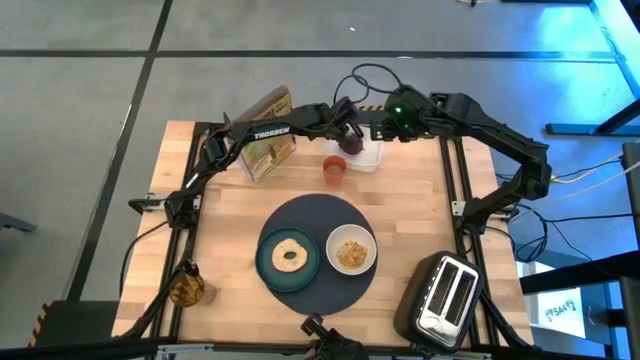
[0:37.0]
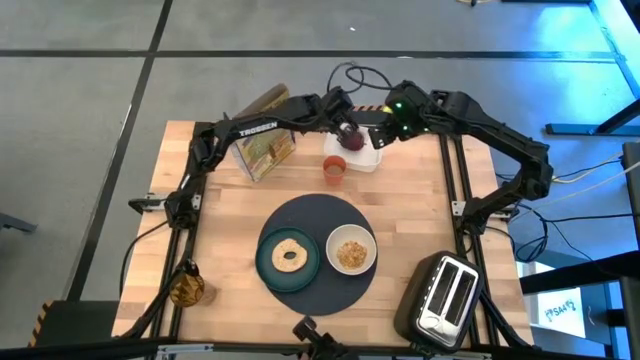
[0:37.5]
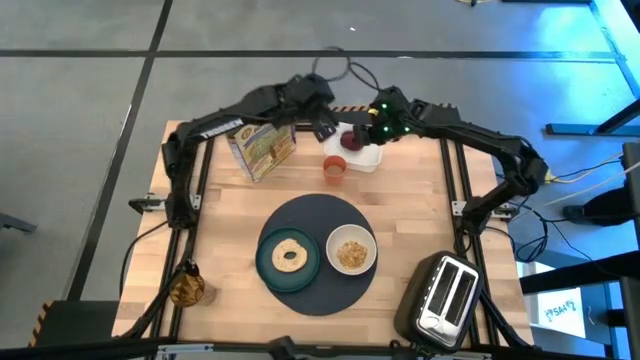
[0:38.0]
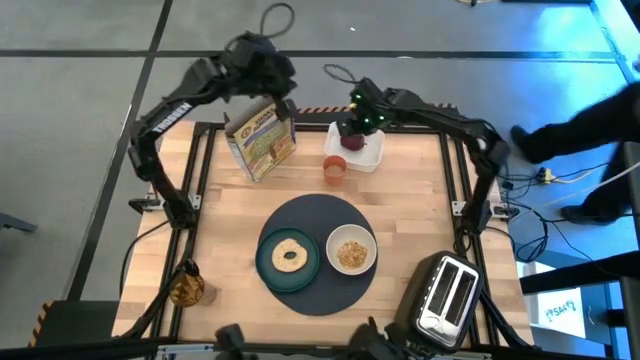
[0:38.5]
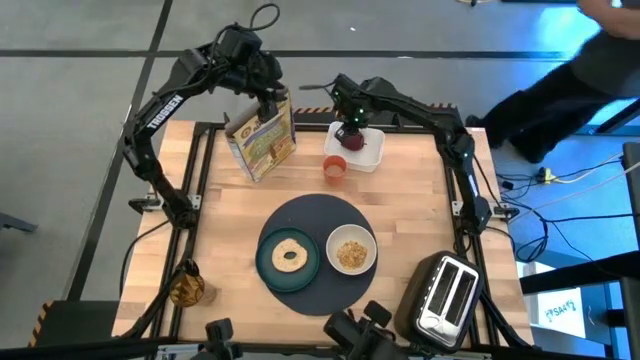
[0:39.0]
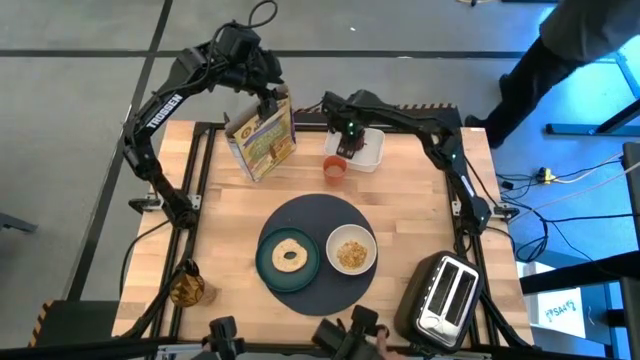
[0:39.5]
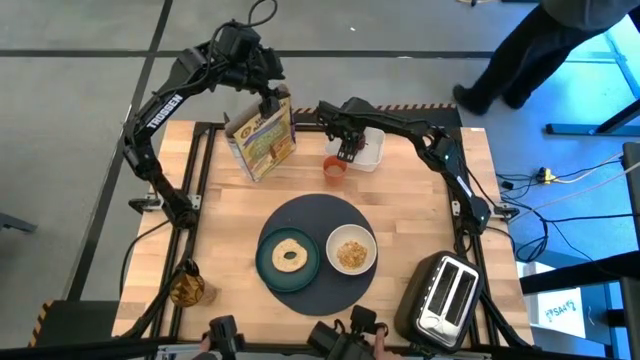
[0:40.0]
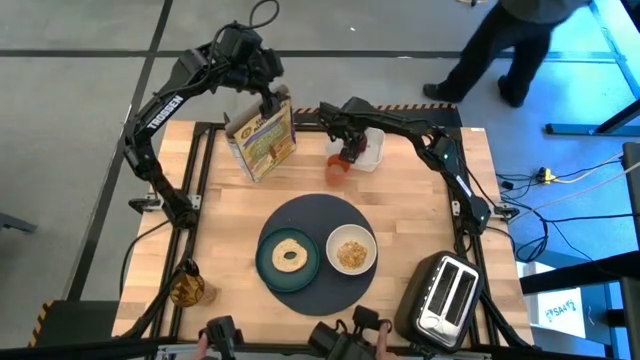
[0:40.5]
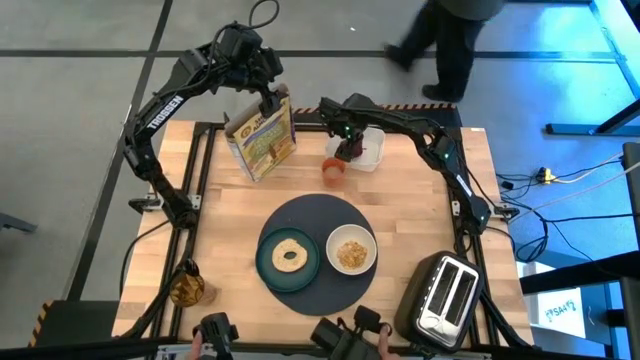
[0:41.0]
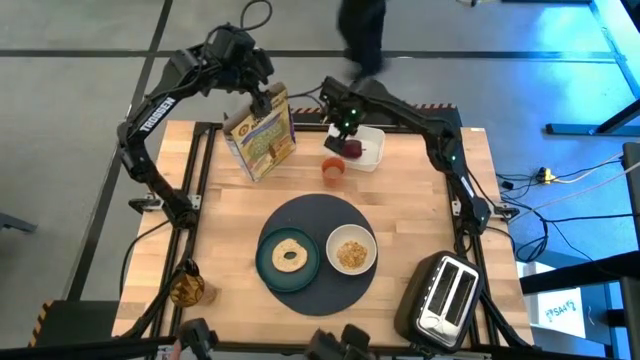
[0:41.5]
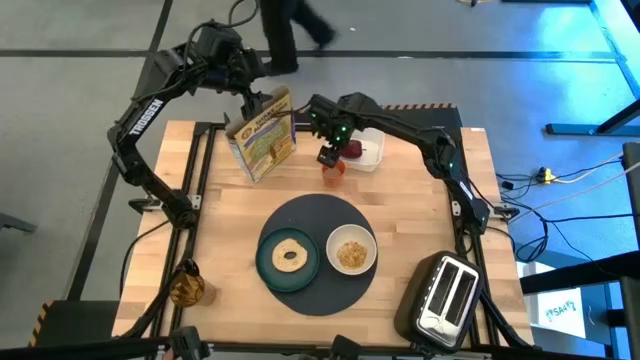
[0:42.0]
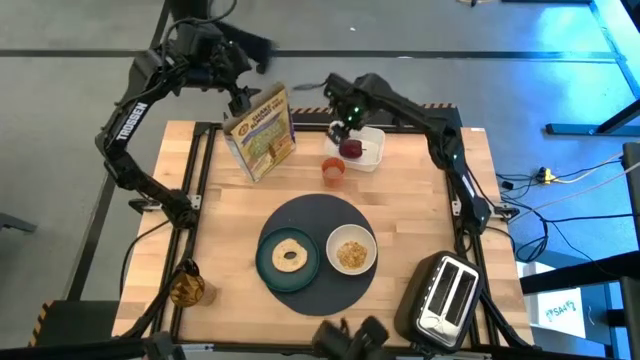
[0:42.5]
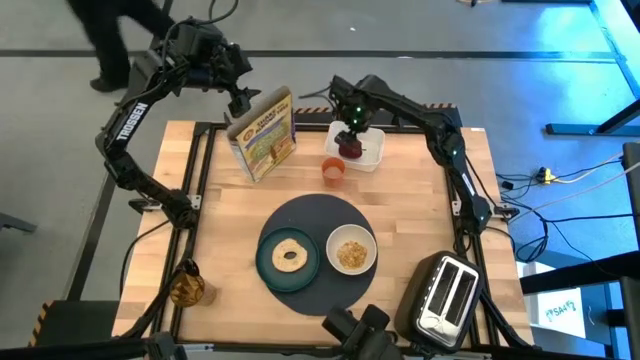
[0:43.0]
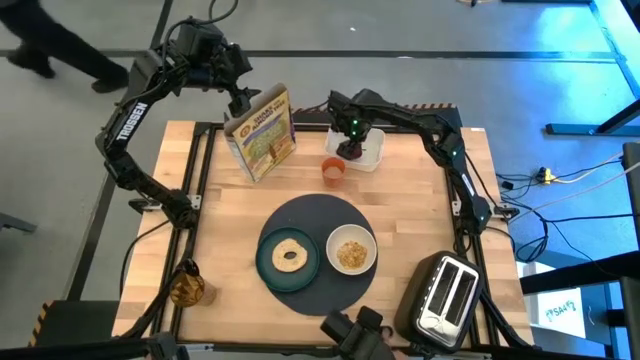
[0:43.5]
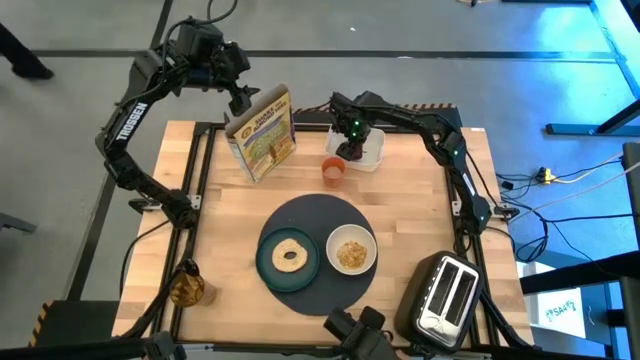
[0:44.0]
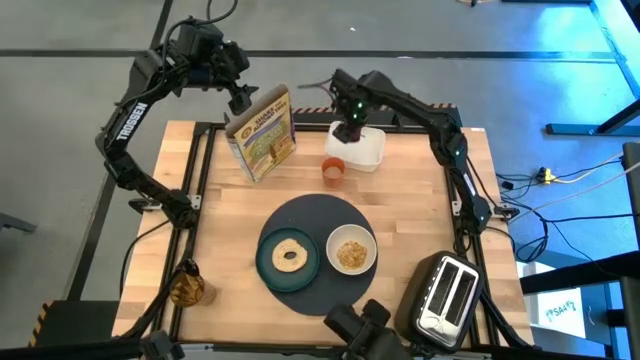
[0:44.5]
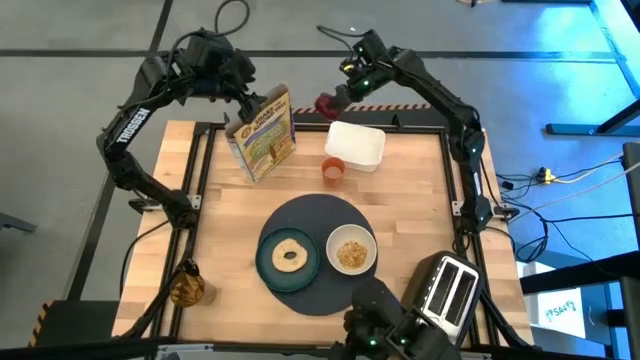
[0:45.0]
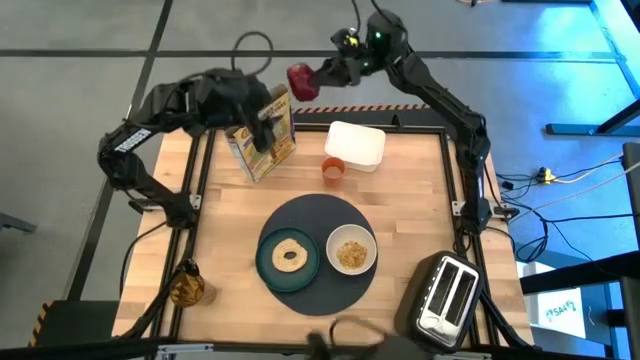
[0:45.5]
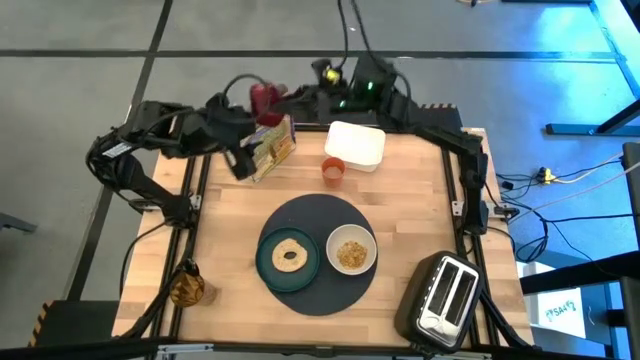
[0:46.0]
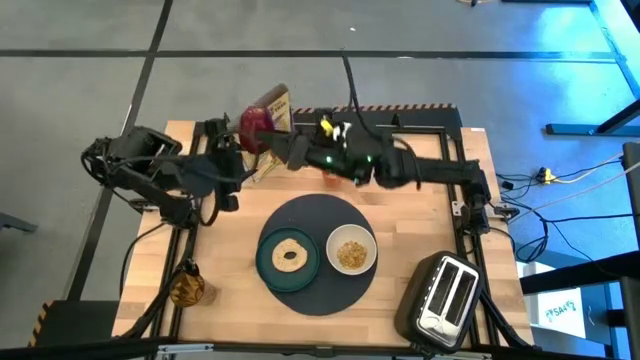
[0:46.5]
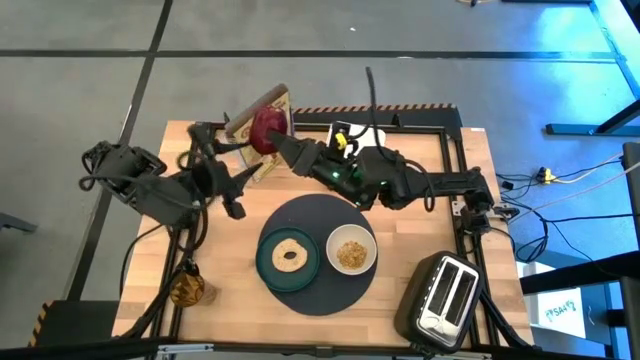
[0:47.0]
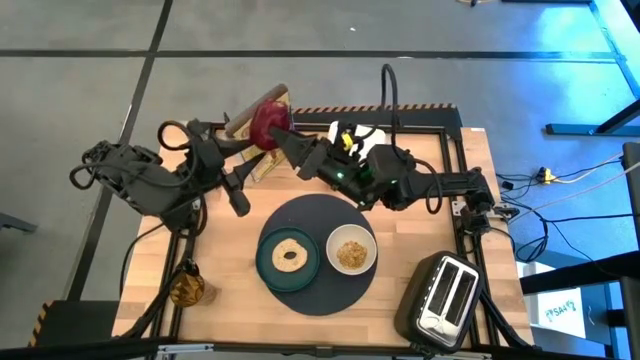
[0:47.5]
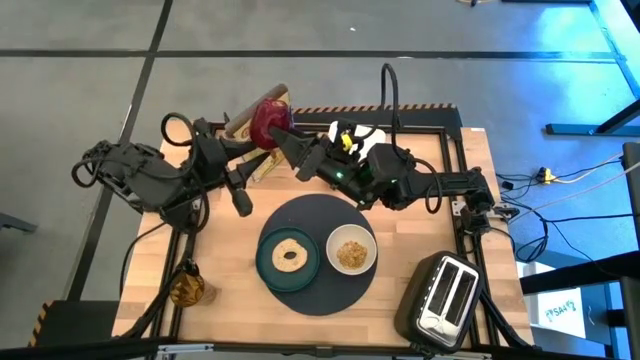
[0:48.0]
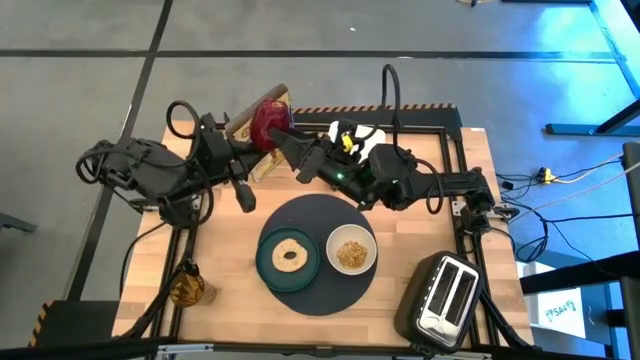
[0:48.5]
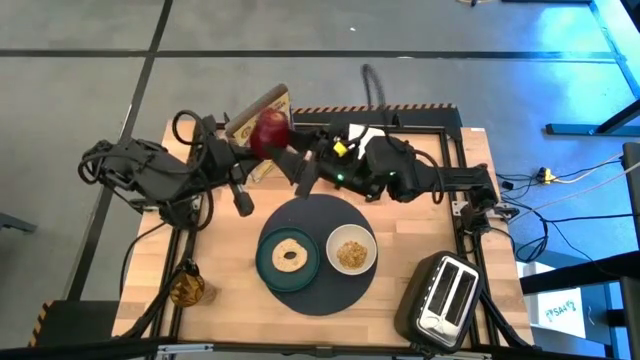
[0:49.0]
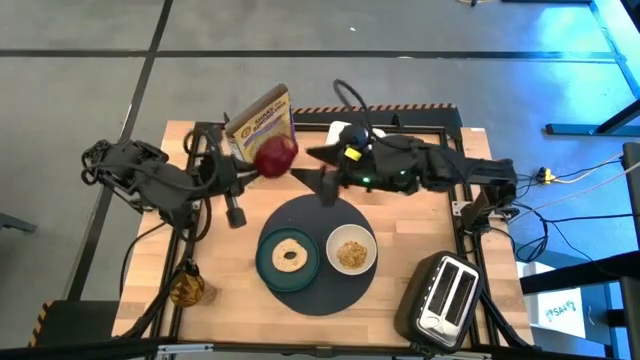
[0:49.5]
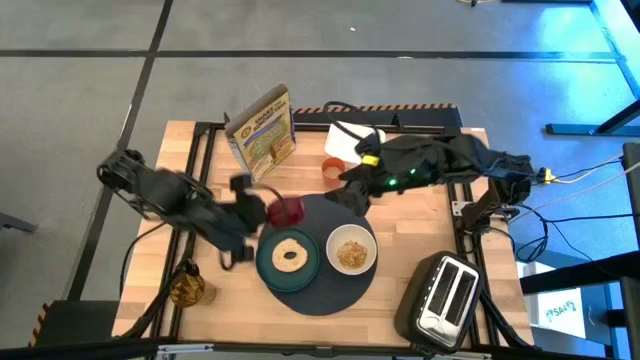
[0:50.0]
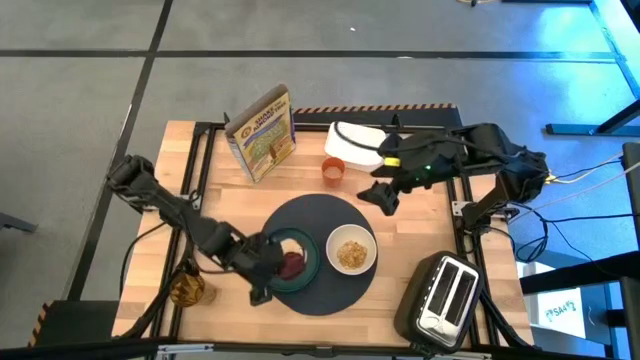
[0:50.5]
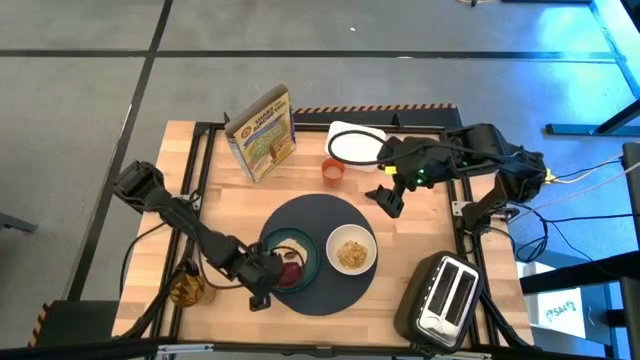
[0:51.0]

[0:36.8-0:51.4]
Task: Arrange a breakfast setting
Put the red apple on the dark green plate

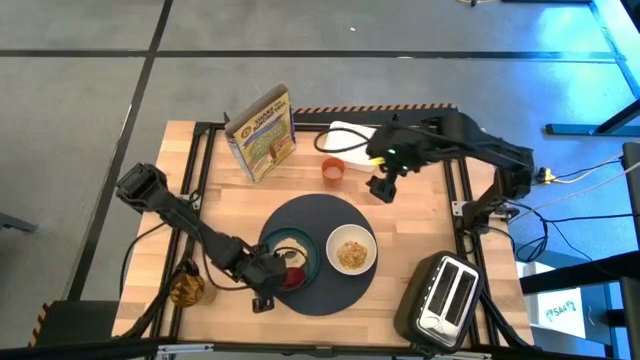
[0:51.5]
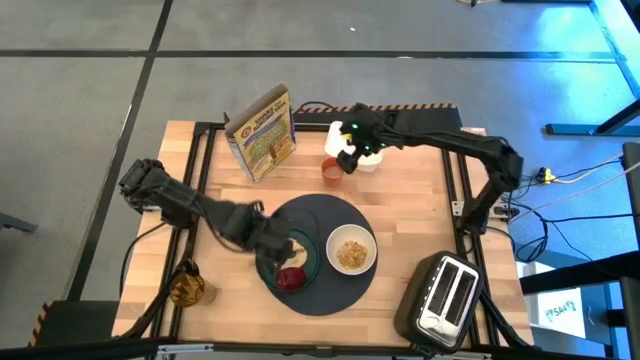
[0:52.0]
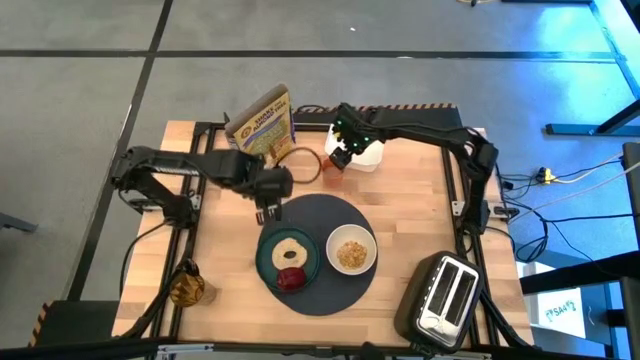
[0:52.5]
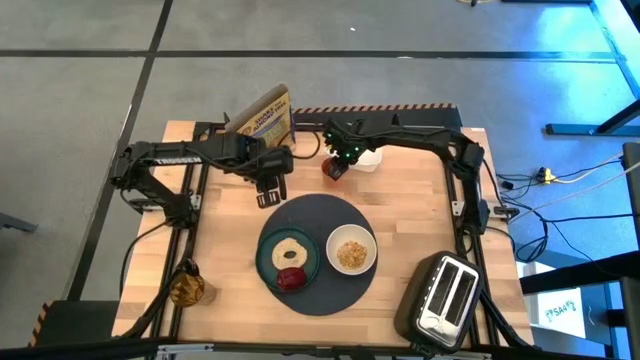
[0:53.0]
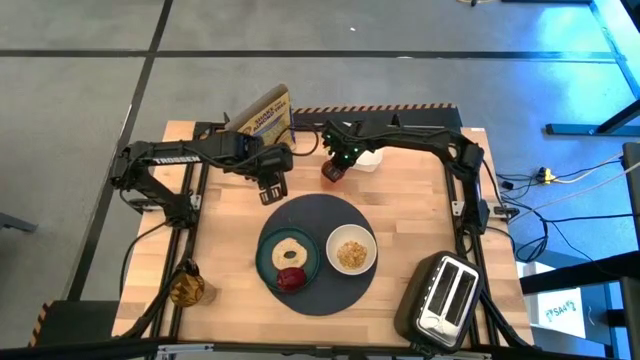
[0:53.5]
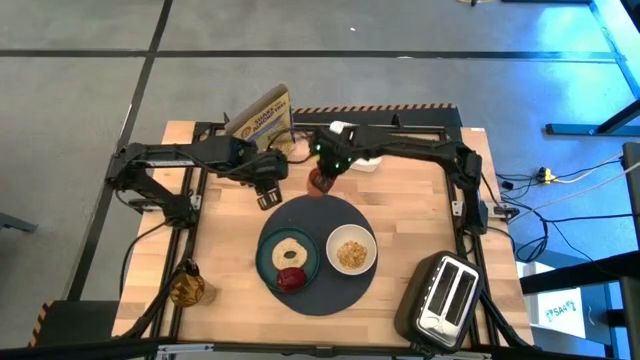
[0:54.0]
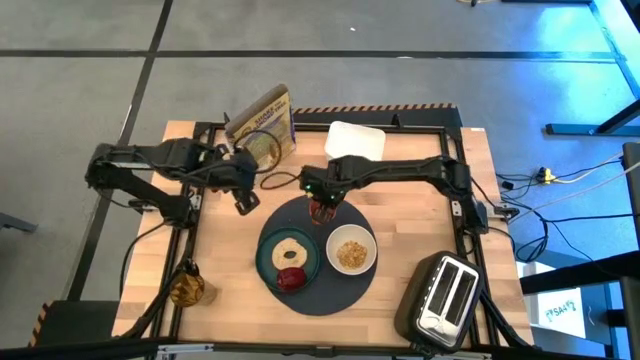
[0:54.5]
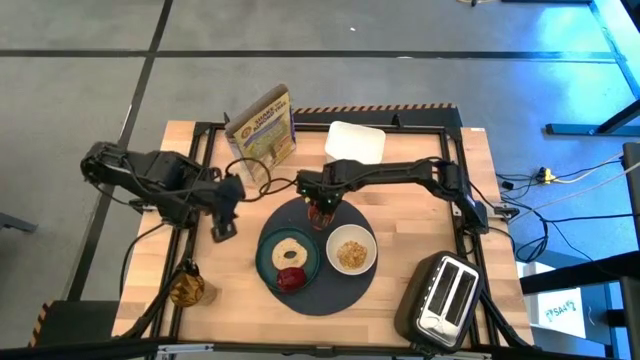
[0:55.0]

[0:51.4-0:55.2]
Put the orange cup on the black mat
